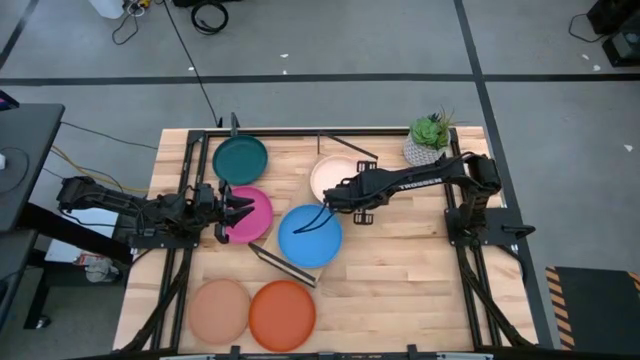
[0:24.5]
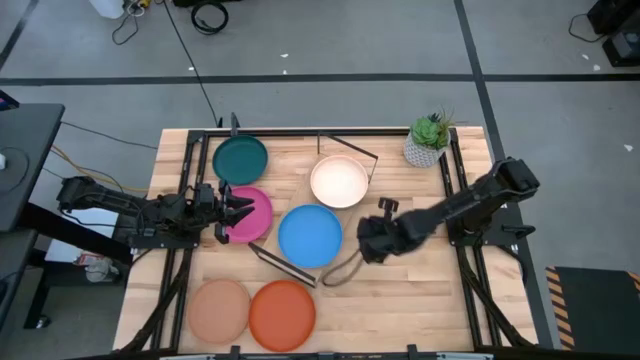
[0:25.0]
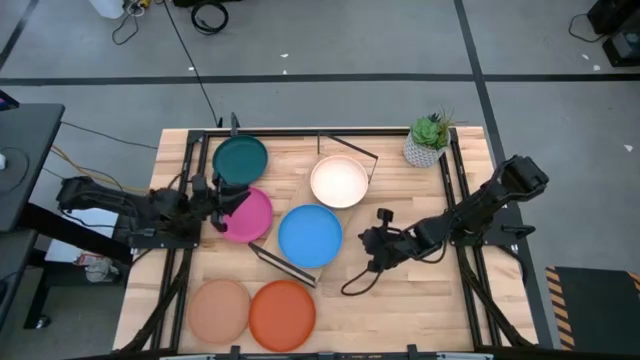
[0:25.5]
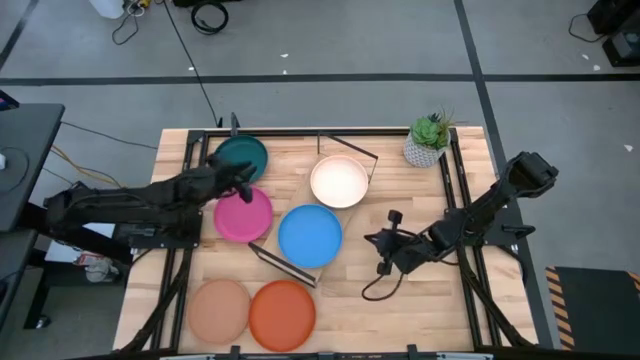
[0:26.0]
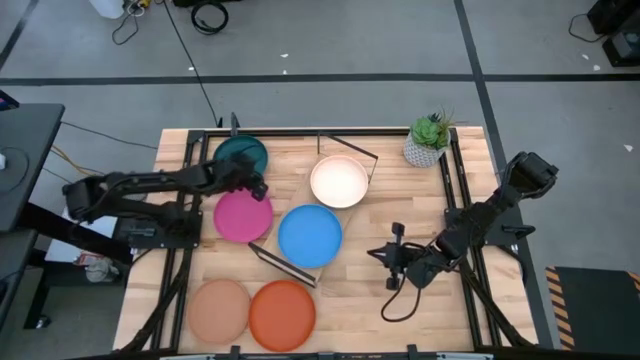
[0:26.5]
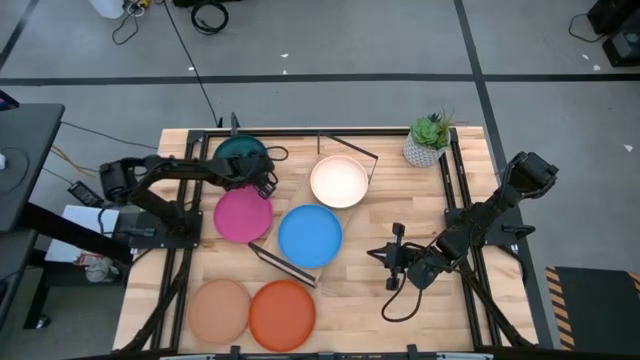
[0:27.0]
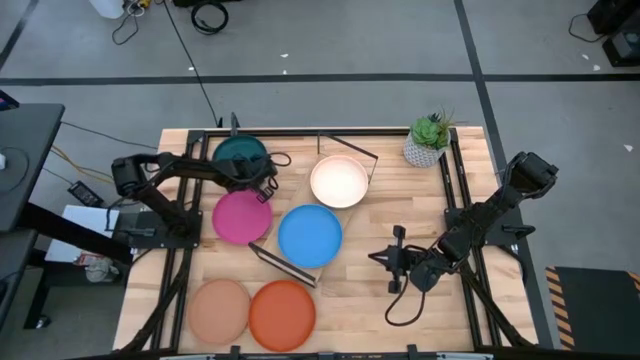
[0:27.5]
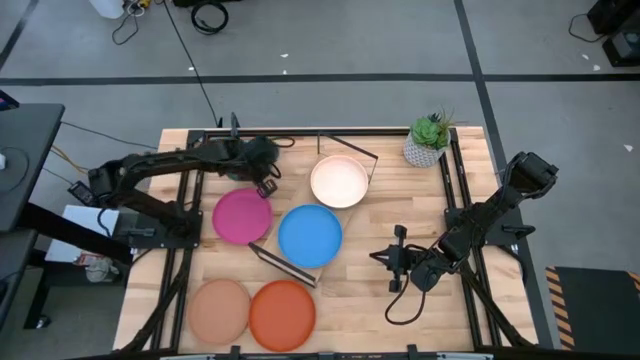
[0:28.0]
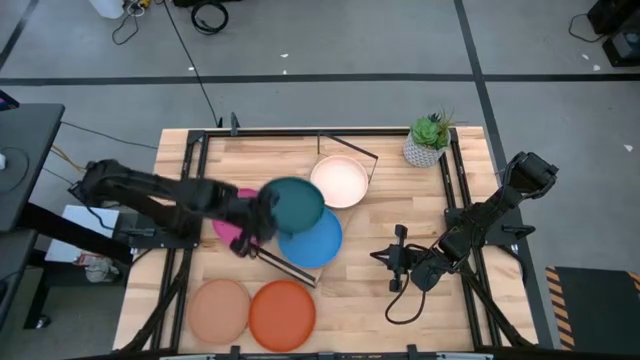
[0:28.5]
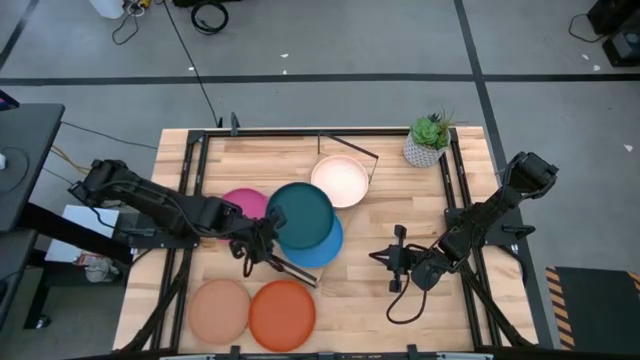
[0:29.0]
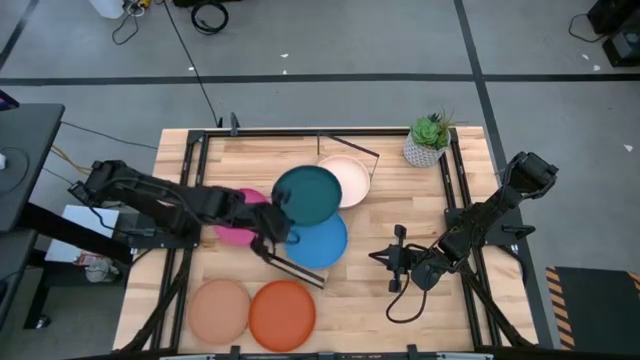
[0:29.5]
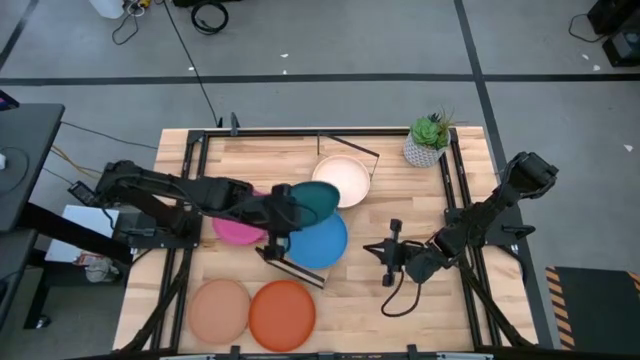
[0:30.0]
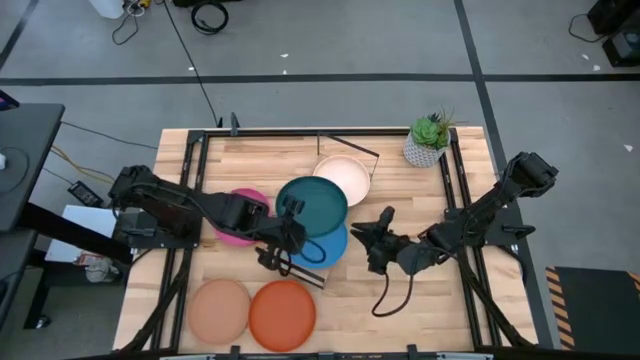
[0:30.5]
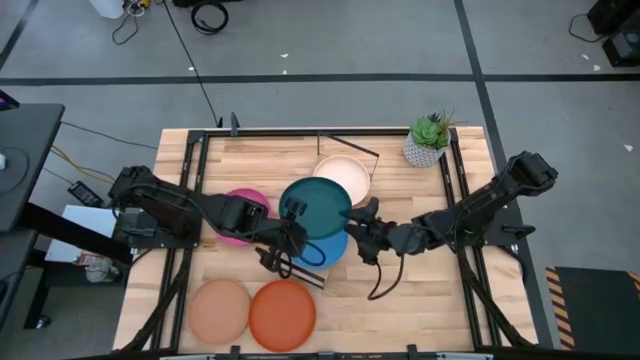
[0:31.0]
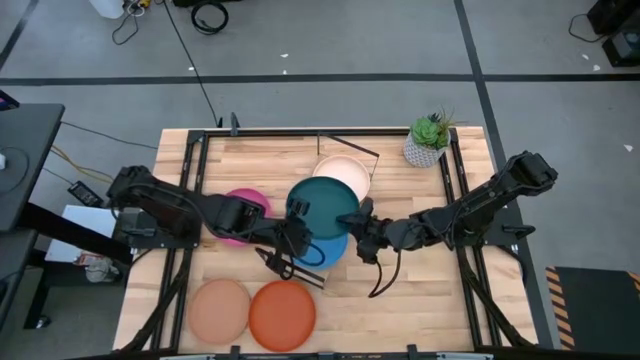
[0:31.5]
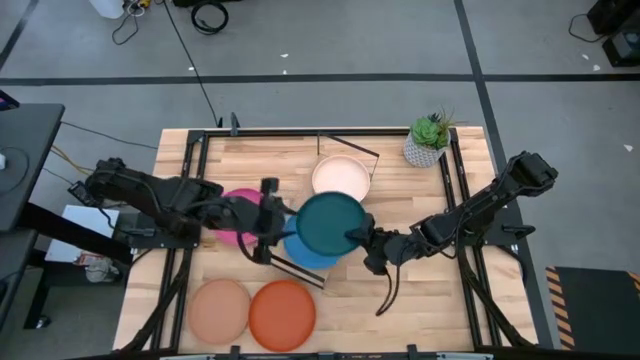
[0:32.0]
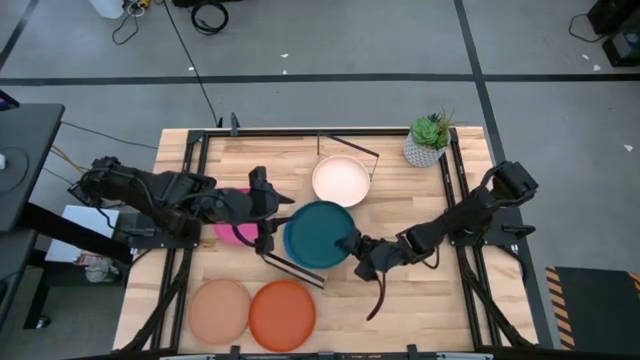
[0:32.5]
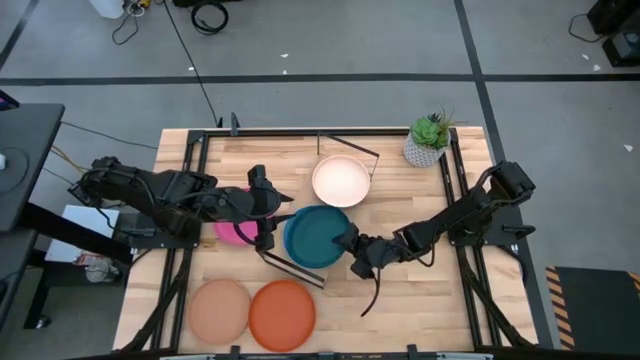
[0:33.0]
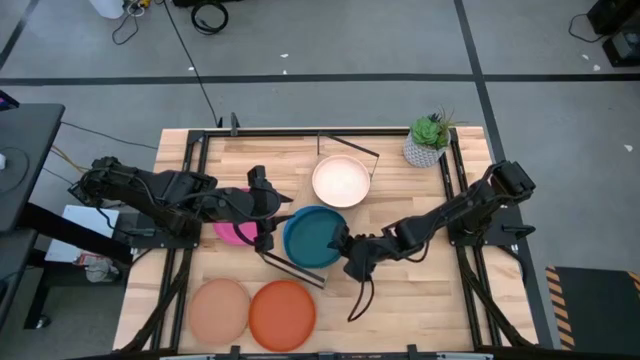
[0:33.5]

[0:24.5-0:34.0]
Task: Place and stack plates onto a shelf
Stack the dark green plate on top of the blue plate on the shelf

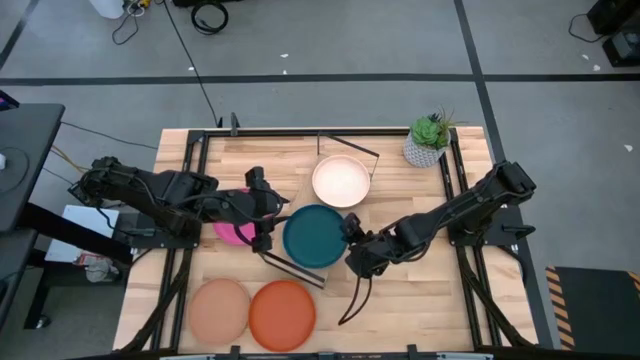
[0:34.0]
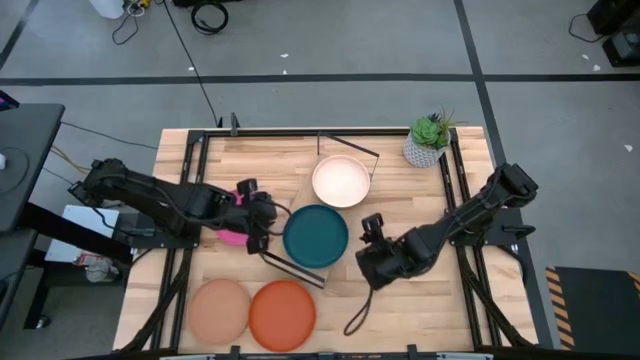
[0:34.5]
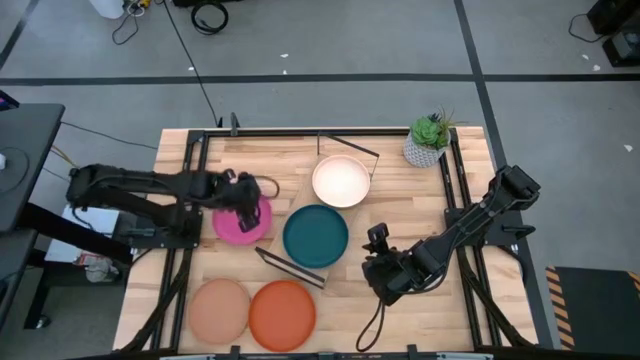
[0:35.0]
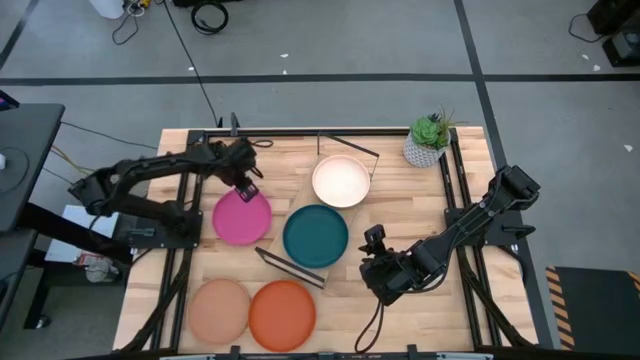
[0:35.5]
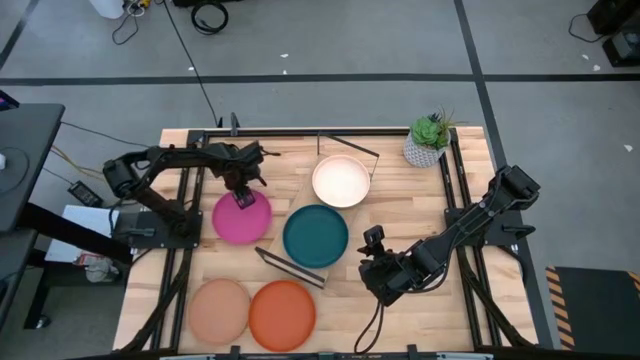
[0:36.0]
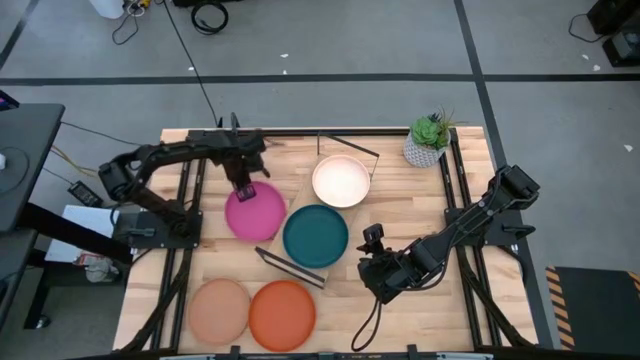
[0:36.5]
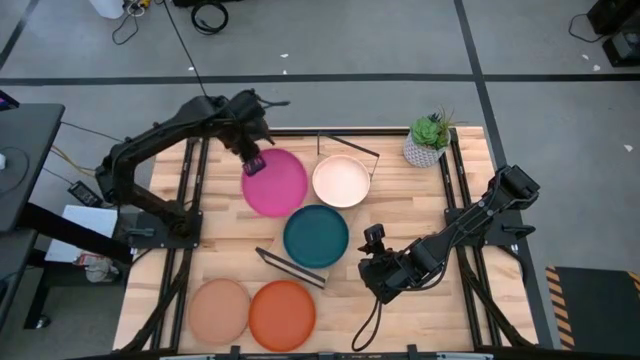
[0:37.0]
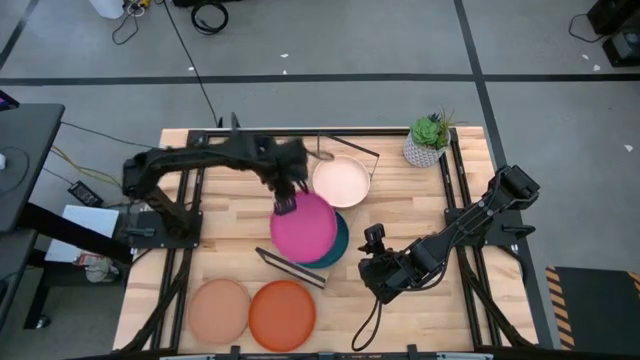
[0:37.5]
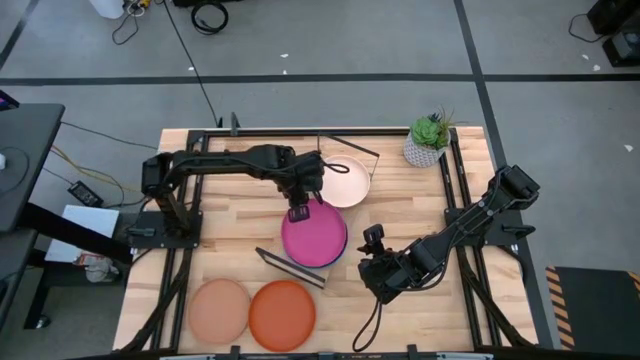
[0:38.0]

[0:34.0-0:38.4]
Stack the pink plate on top of the dark green plate on the shelf

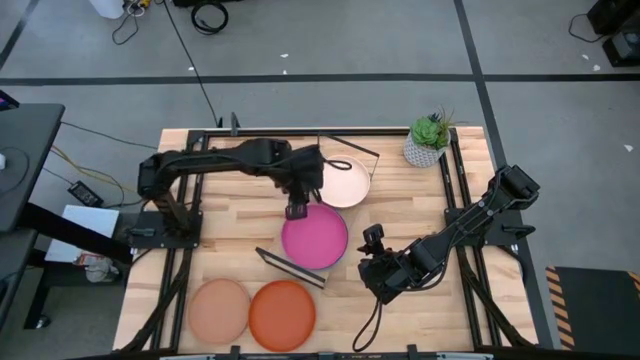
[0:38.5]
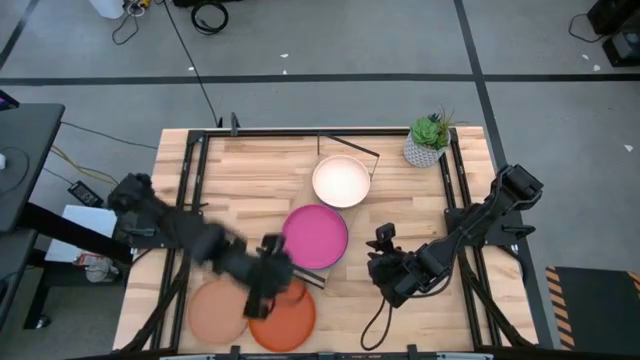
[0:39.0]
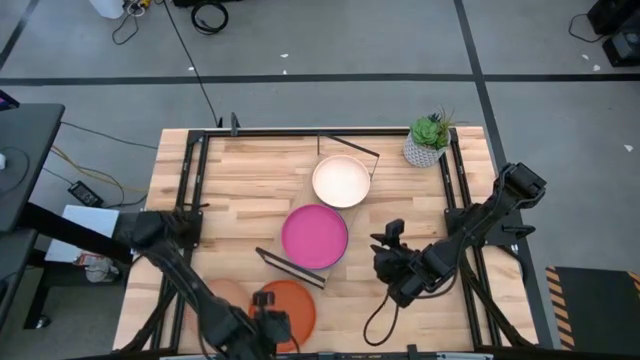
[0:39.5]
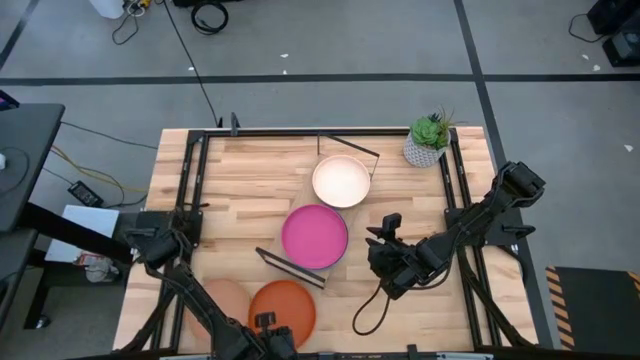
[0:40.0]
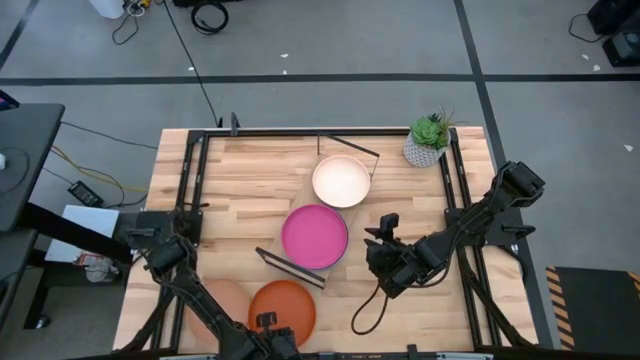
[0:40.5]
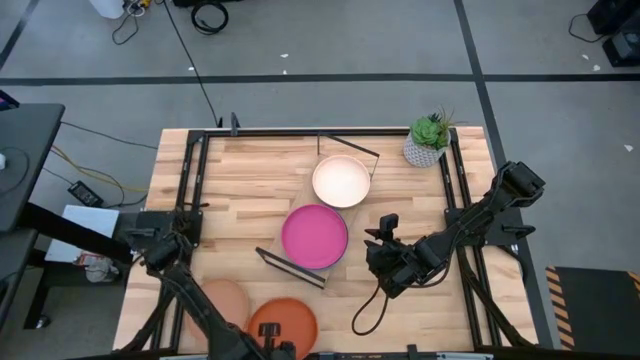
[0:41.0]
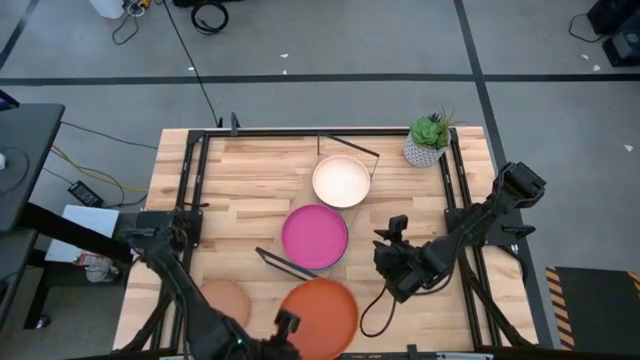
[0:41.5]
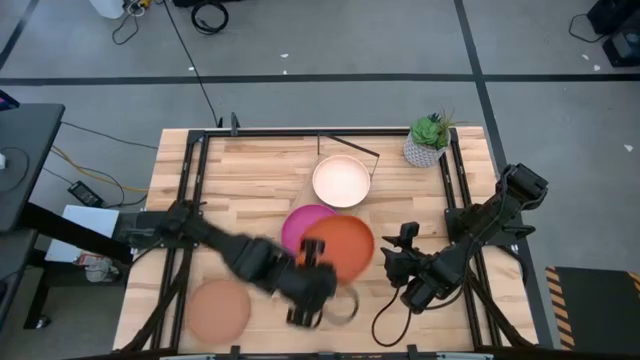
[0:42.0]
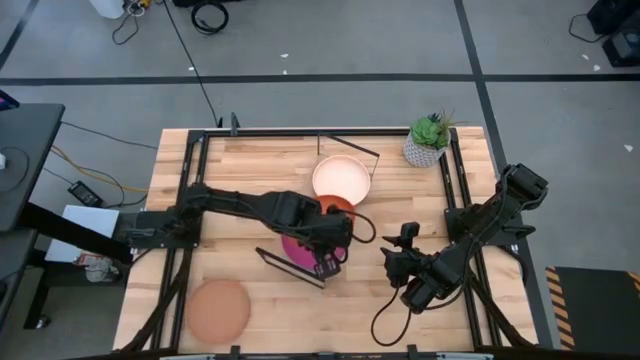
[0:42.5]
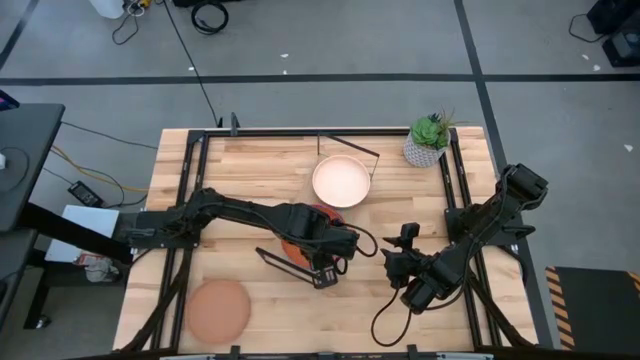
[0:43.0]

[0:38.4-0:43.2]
Stack the orange plate on top of the pink plate on the shelf

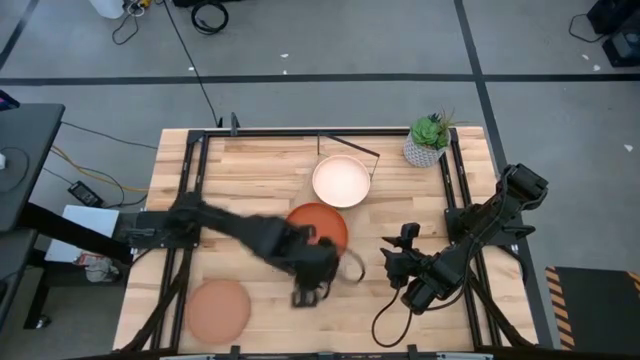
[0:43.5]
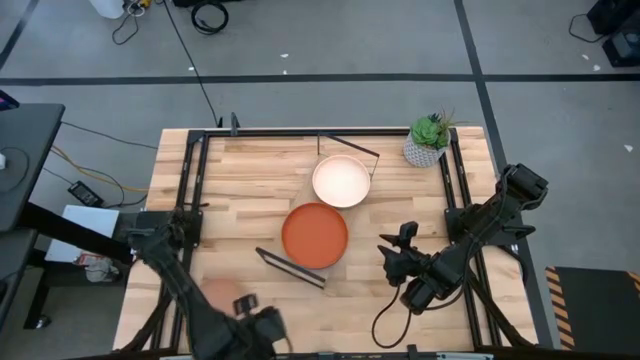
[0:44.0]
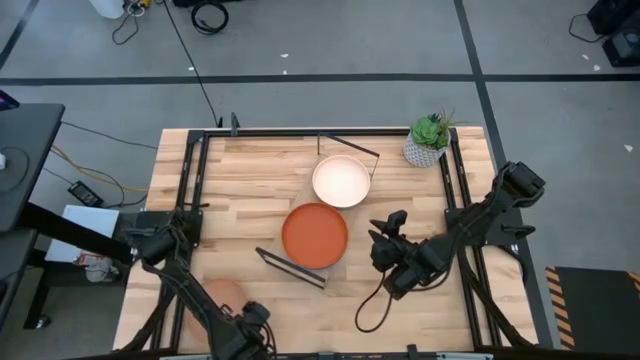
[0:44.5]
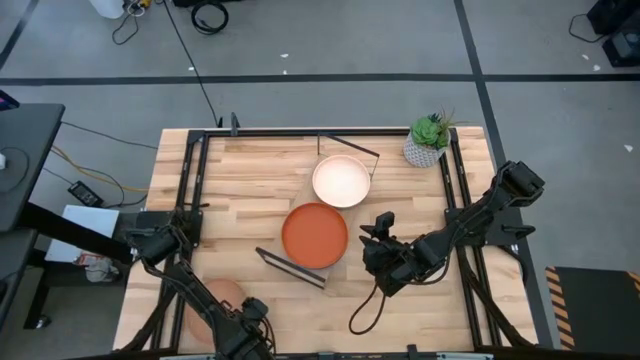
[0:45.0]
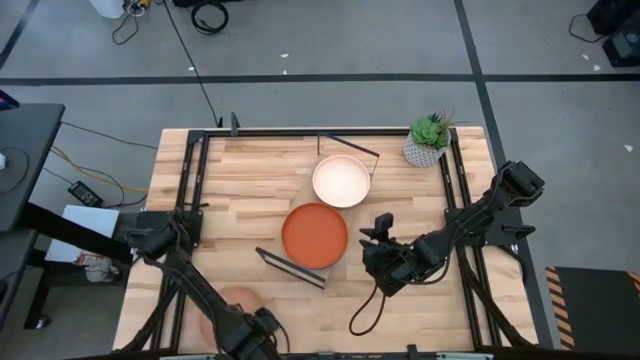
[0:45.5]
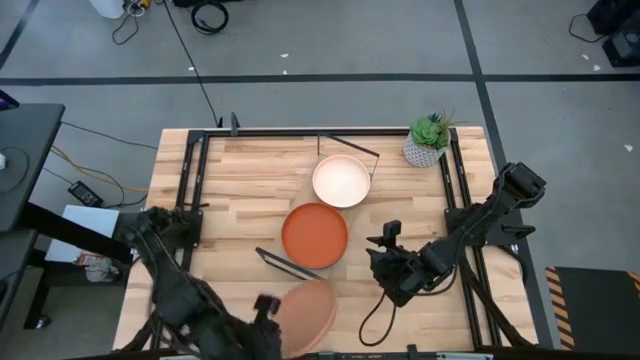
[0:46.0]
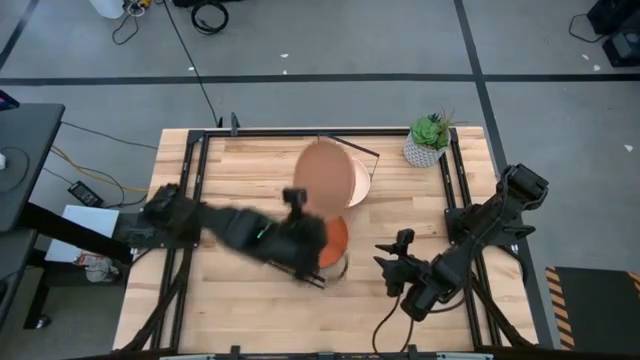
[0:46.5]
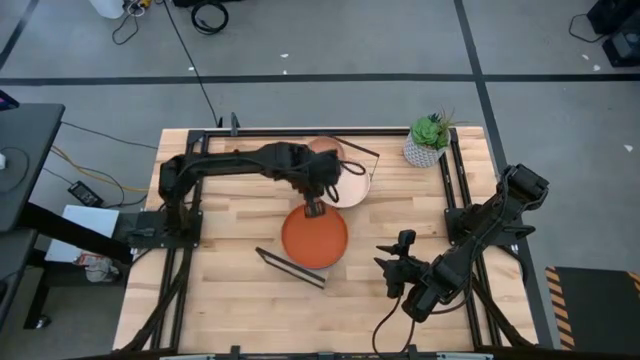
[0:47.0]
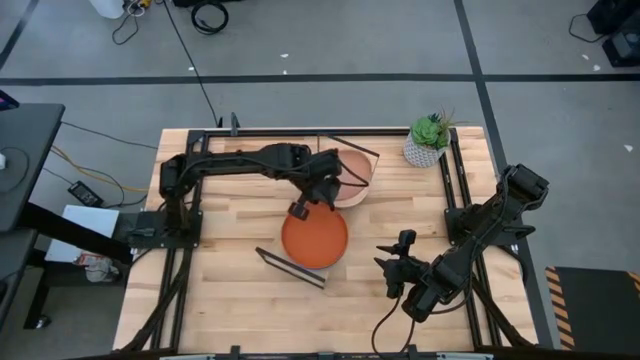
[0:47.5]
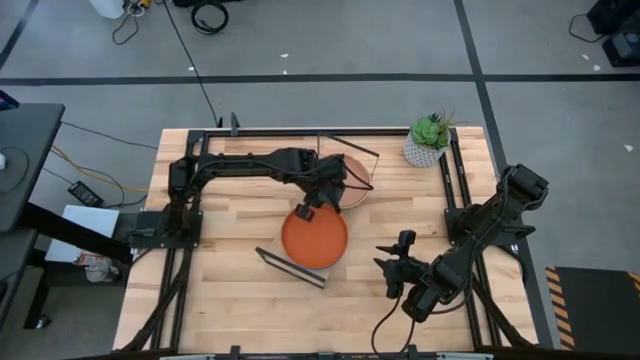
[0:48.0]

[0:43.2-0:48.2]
Stack the brown plate on top of the light orange plate on the shelf
